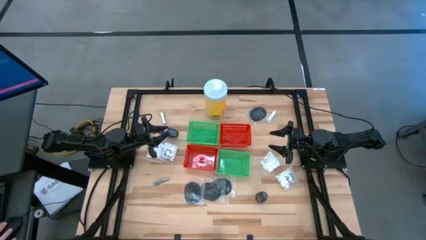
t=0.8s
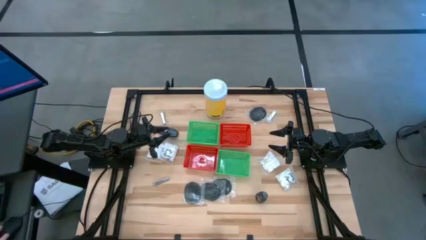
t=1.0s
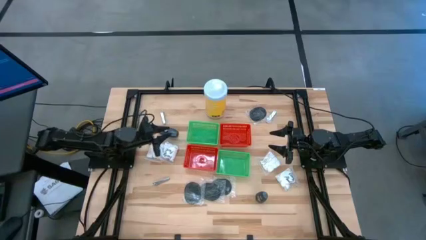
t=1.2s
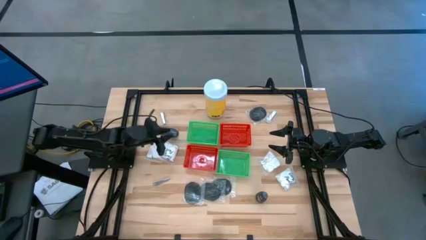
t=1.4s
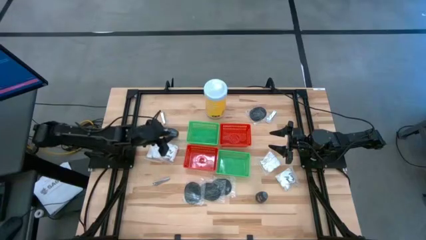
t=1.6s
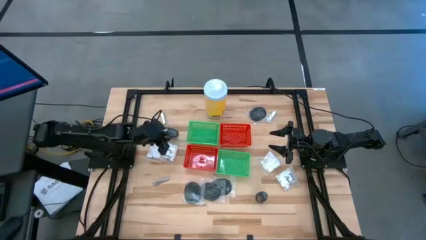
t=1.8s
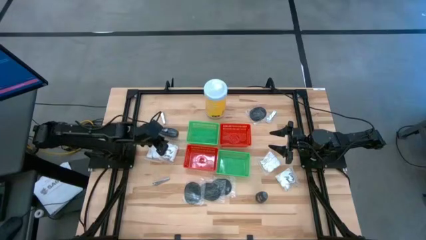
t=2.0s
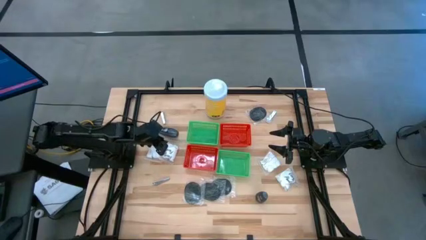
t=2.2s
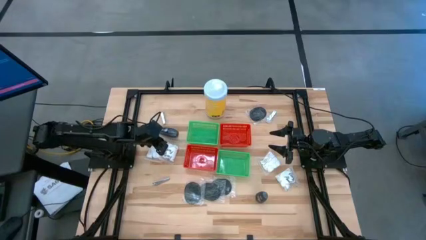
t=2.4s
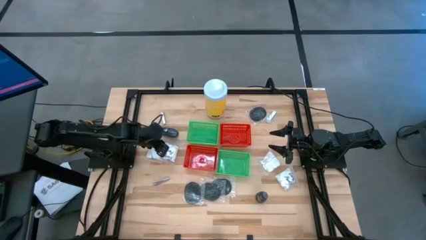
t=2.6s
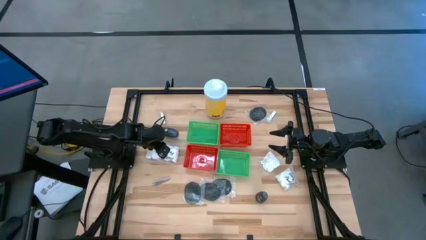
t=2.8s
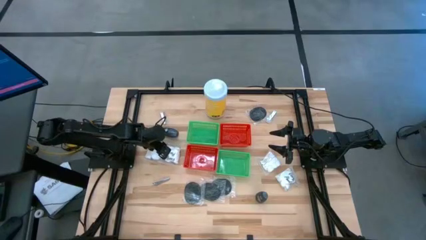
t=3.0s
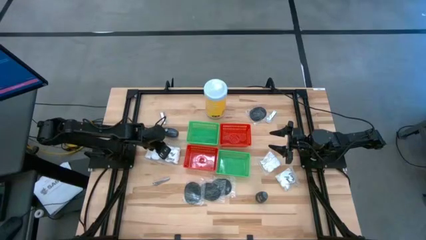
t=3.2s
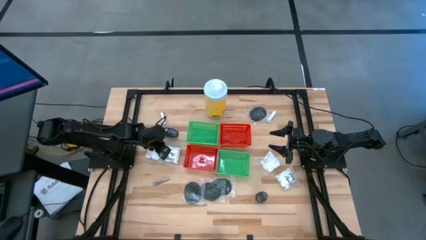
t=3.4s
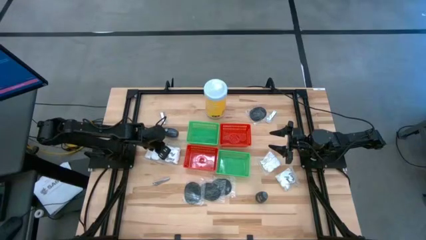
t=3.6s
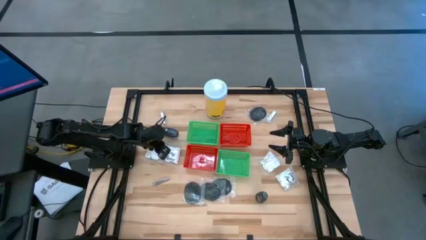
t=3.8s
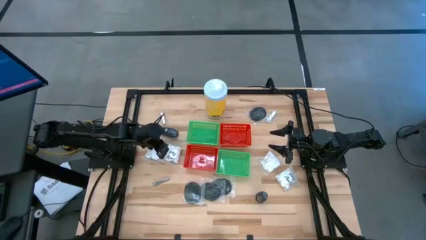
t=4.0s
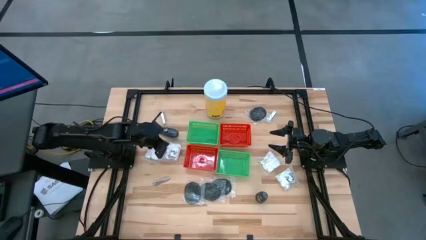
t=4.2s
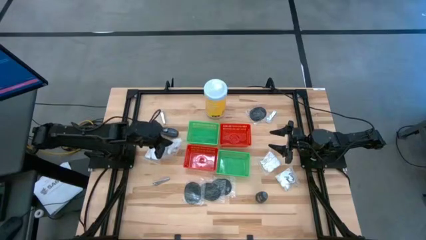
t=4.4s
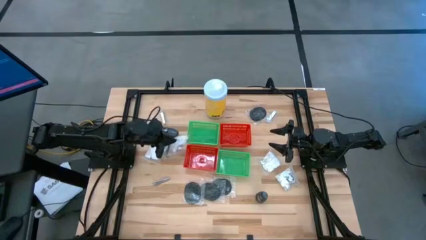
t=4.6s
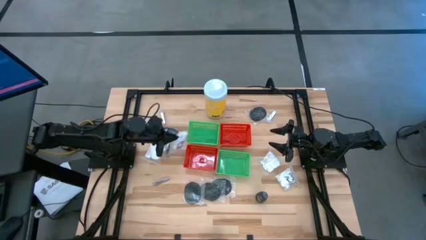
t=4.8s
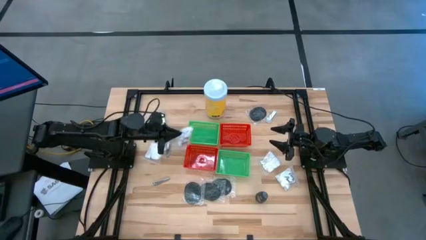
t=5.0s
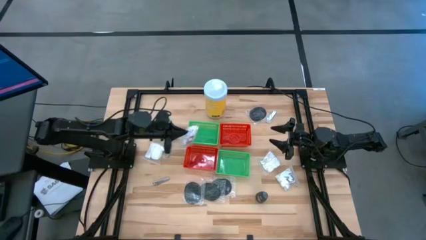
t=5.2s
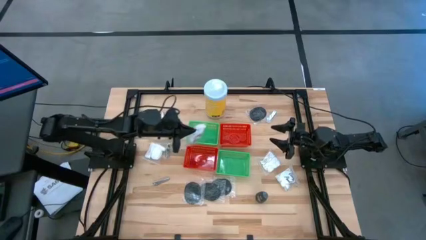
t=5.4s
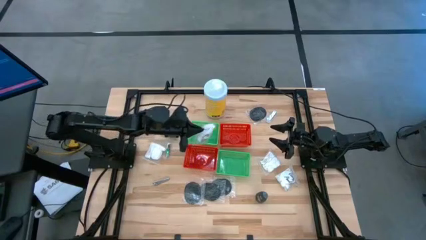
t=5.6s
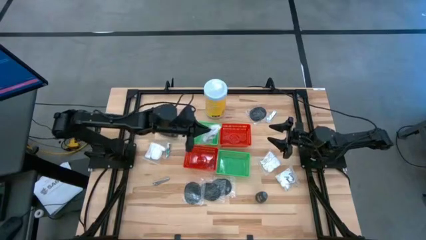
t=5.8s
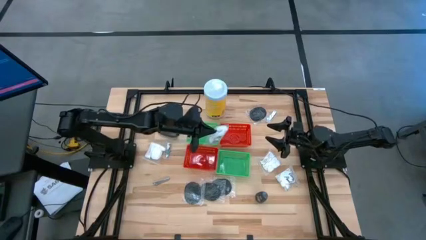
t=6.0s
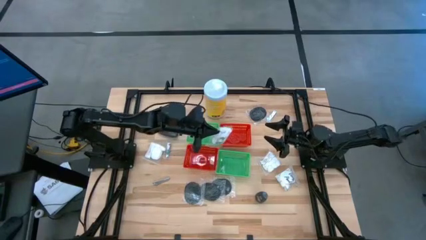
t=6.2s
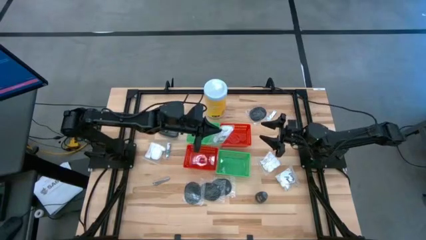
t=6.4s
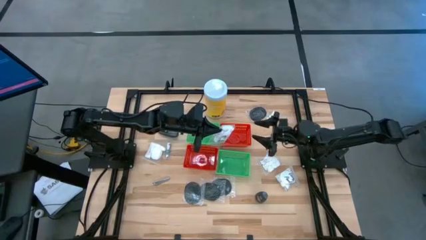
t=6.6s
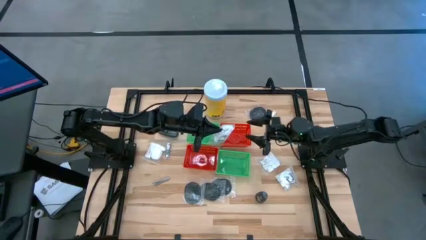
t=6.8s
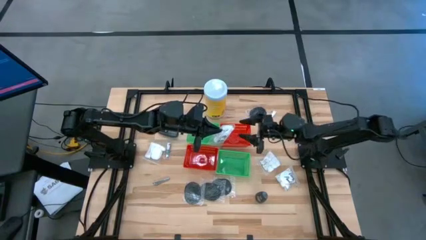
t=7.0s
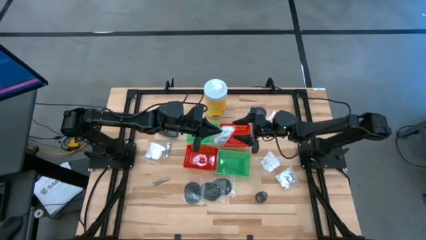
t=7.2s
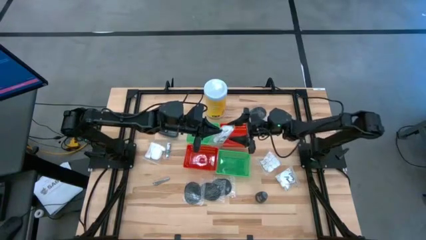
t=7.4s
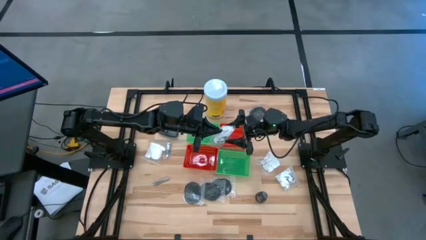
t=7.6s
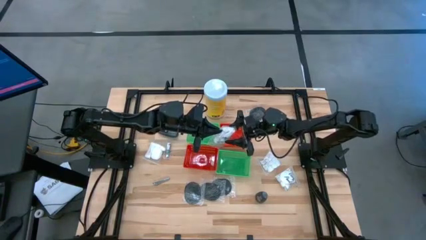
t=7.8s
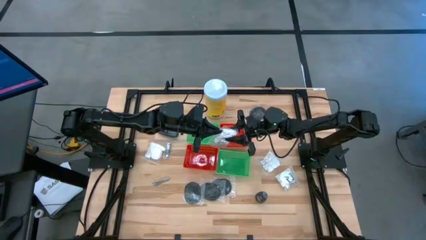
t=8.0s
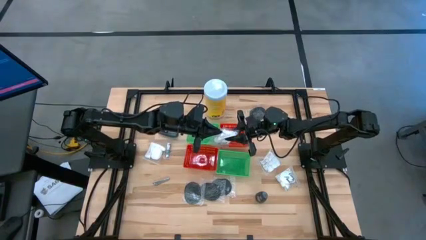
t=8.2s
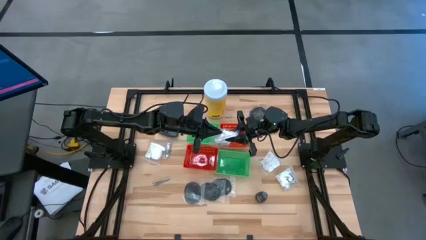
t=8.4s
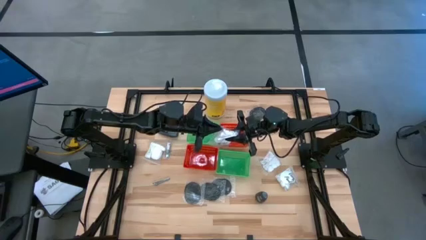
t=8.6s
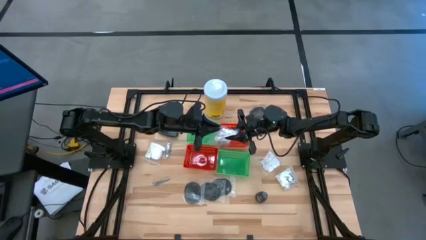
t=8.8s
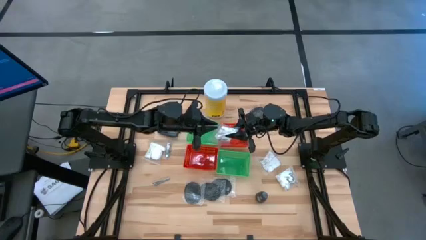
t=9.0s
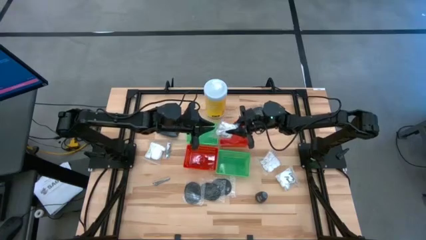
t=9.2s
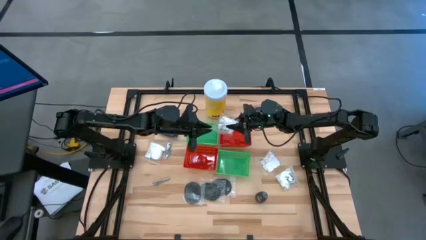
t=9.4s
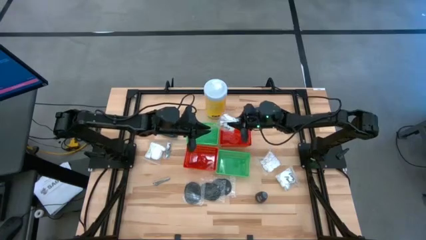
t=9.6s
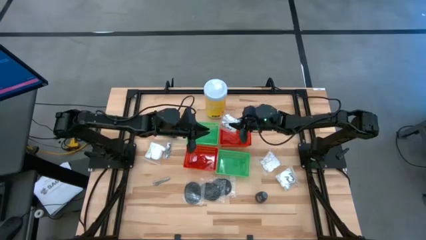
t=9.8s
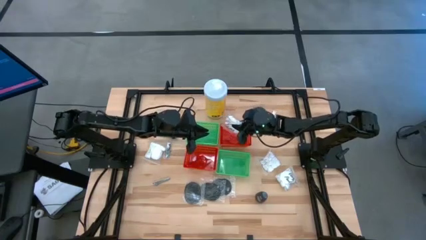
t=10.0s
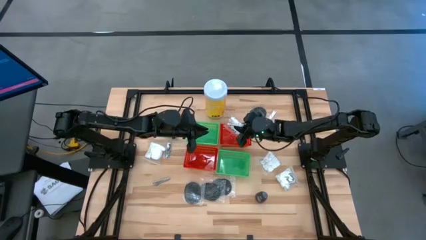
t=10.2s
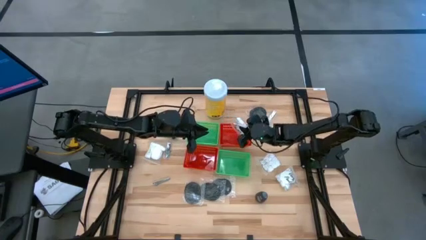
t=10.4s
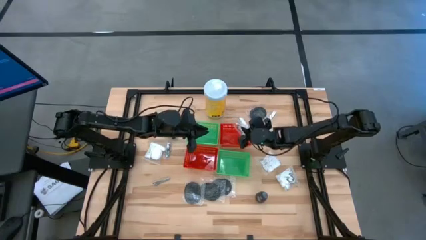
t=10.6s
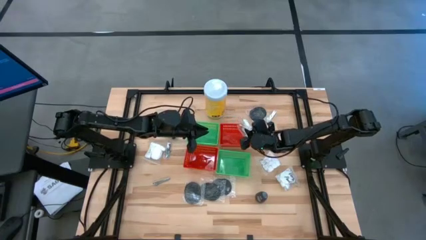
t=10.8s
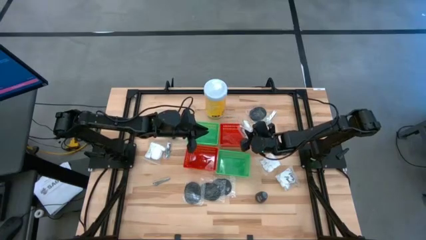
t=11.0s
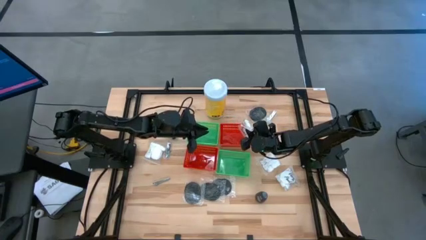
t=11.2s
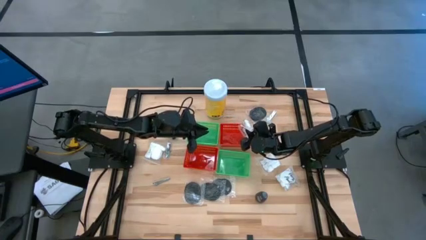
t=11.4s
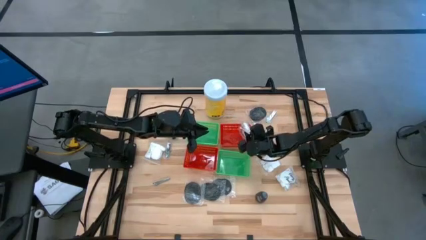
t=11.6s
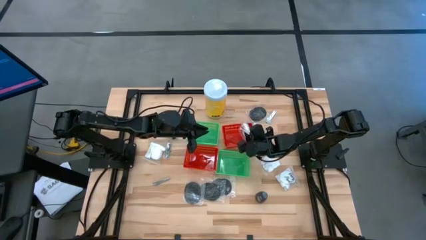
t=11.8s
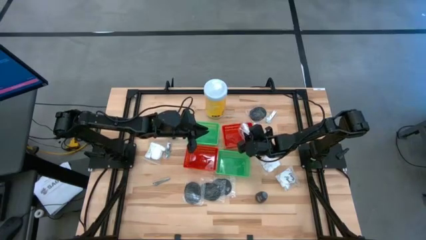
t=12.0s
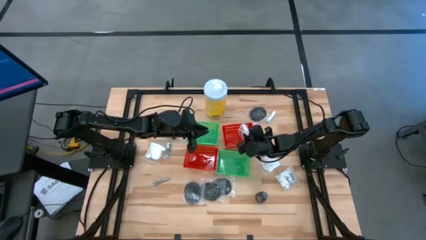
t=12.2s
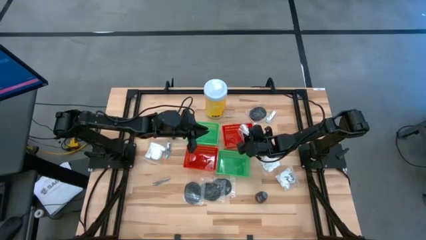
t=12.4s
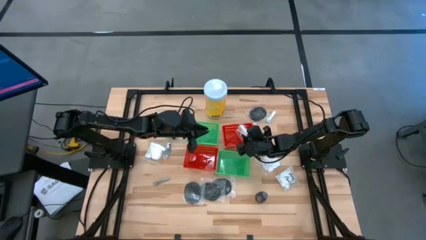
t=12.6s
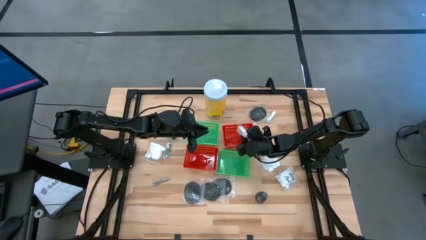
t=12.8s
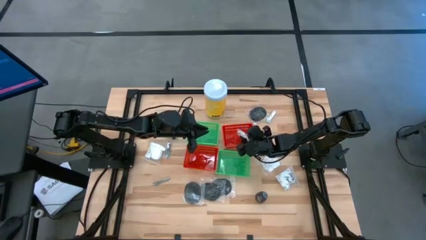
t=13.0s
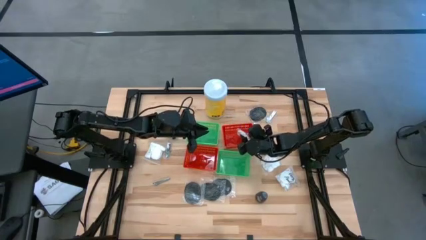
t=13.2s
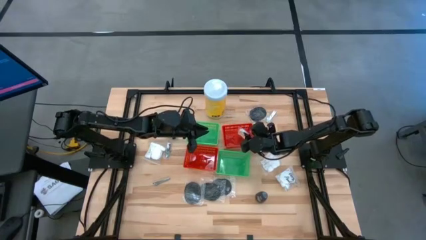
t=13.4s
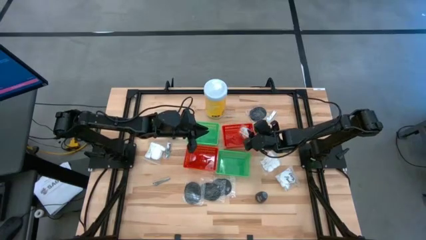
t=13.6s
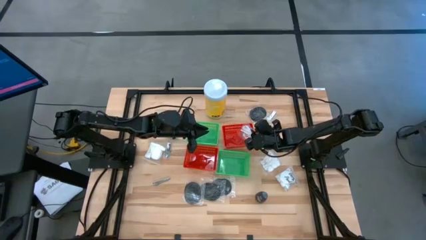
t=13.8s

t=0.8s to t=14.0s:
Task: Pick & Place Travel size toiletries
Put the cotton pack into the right red bin
